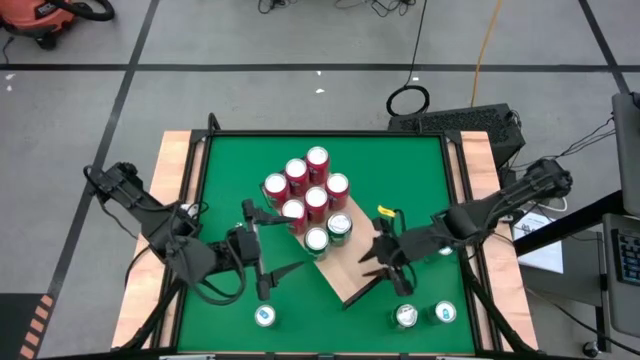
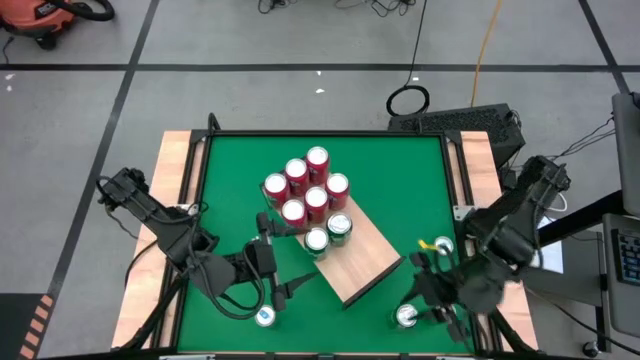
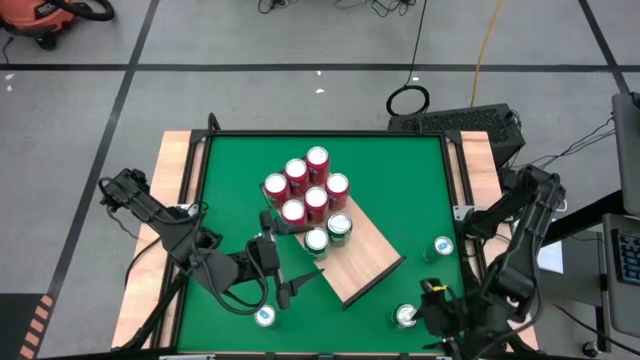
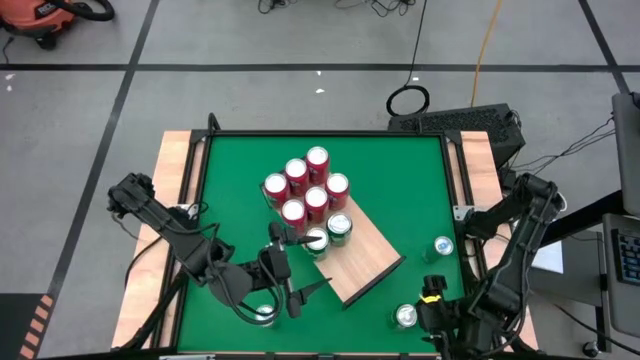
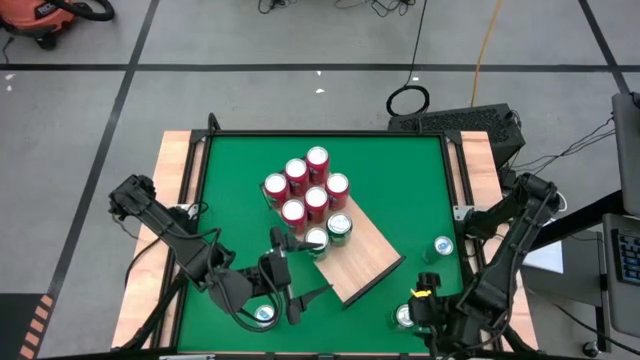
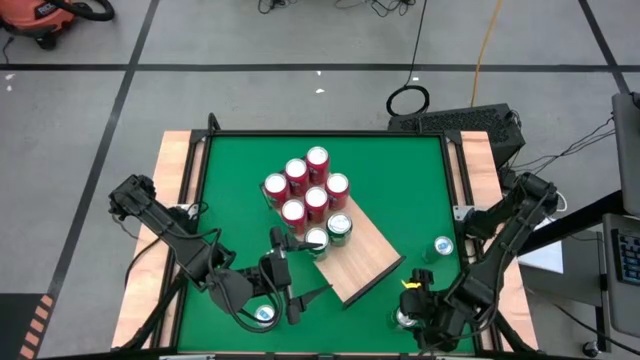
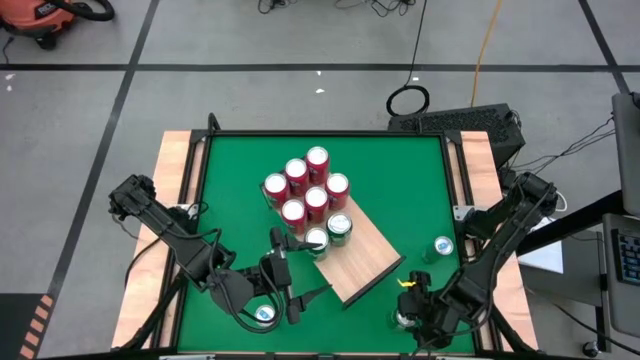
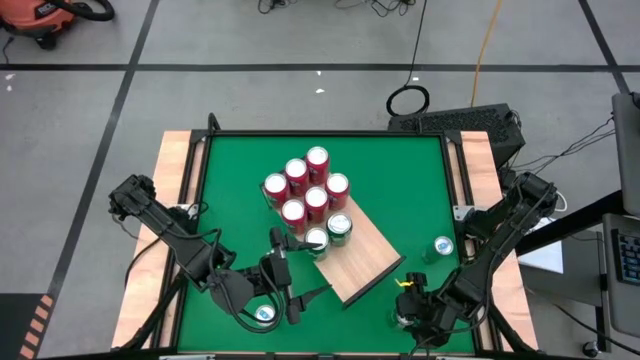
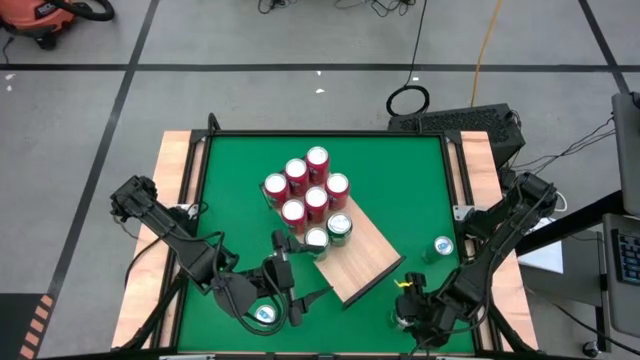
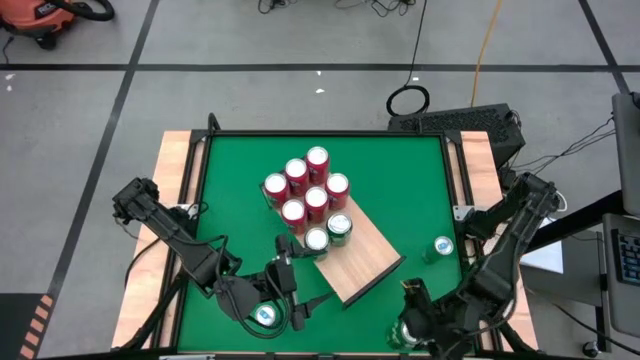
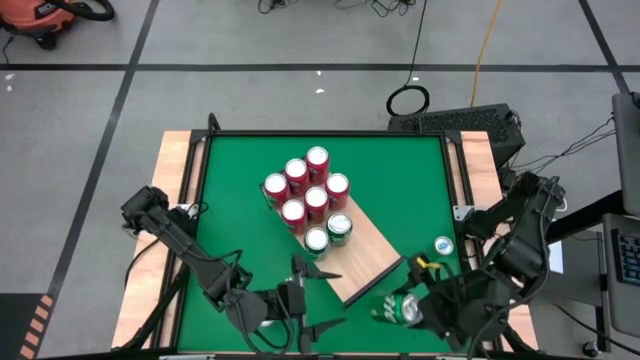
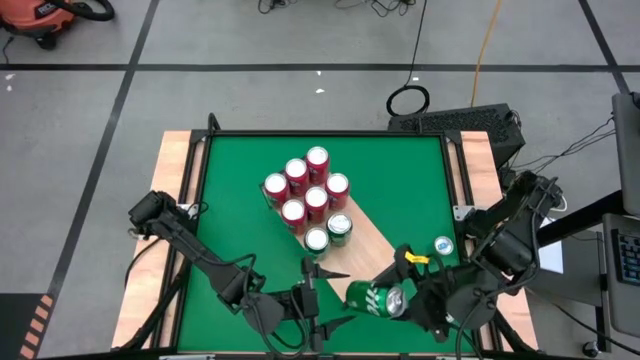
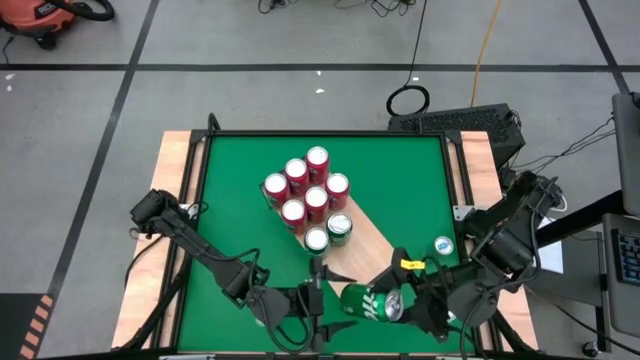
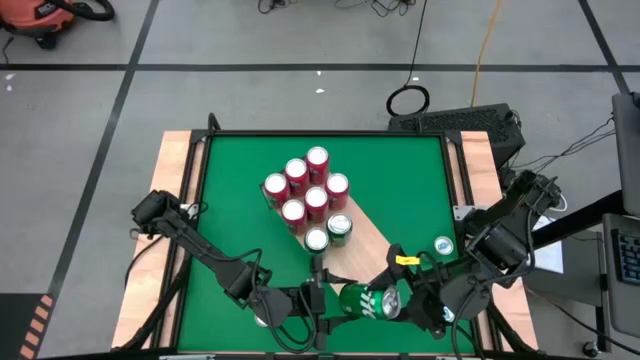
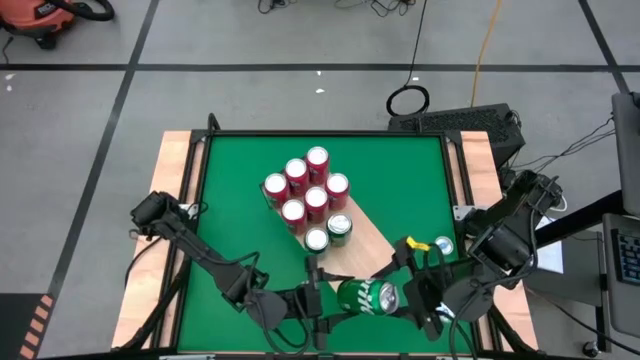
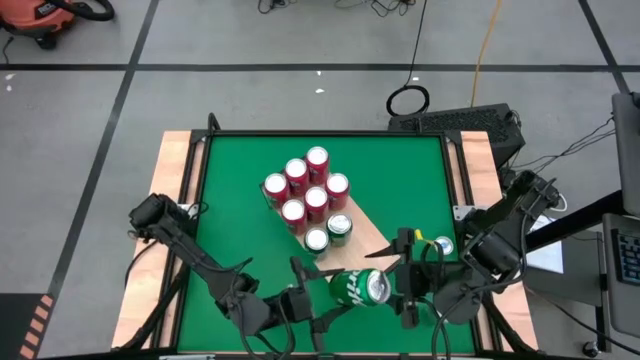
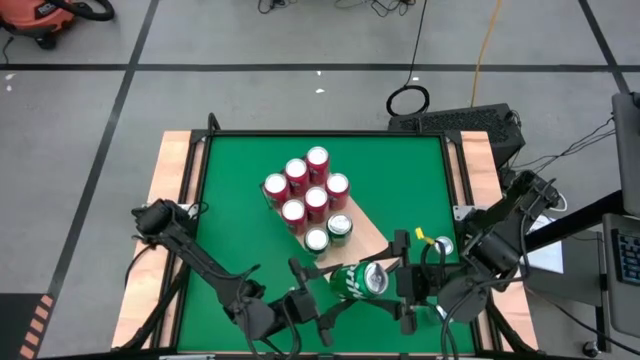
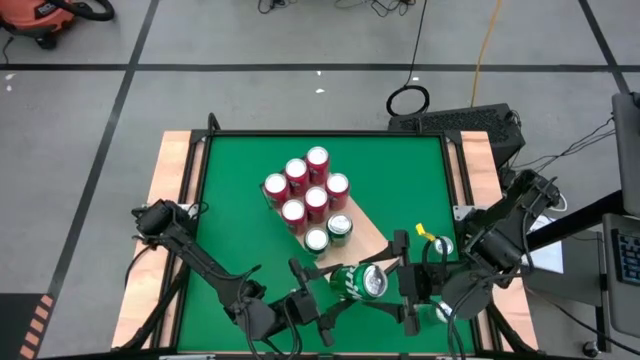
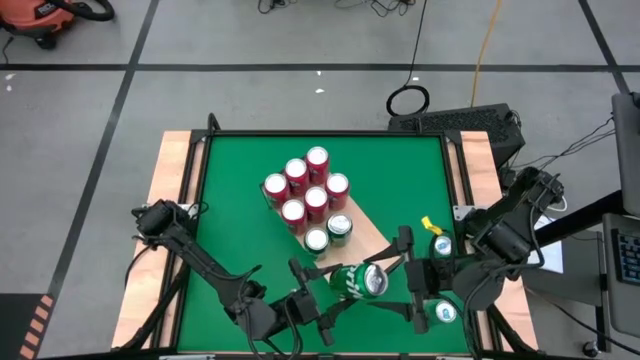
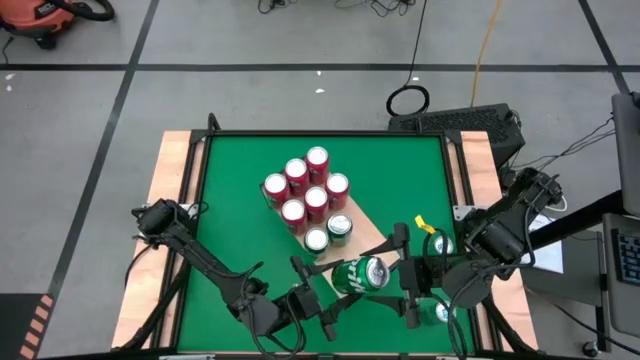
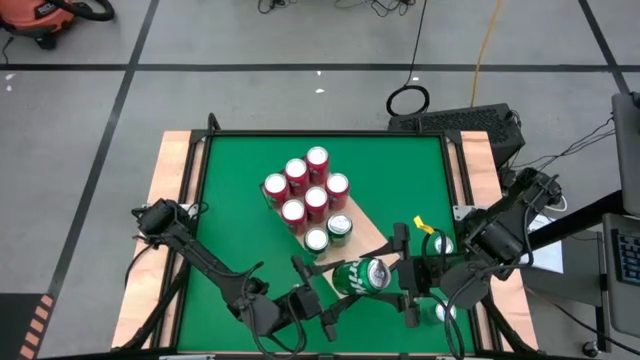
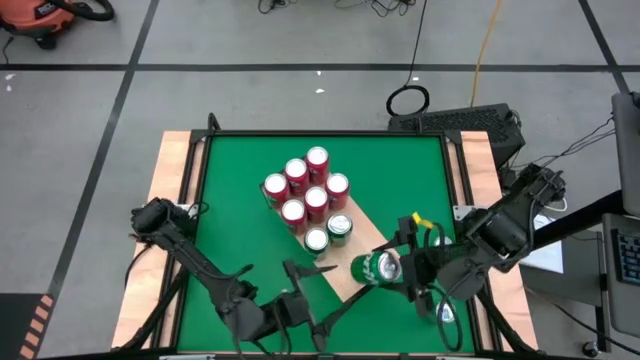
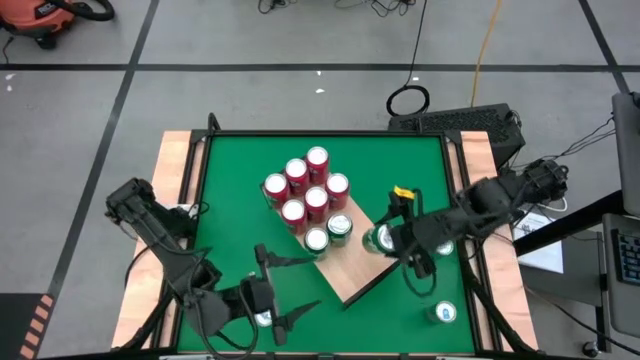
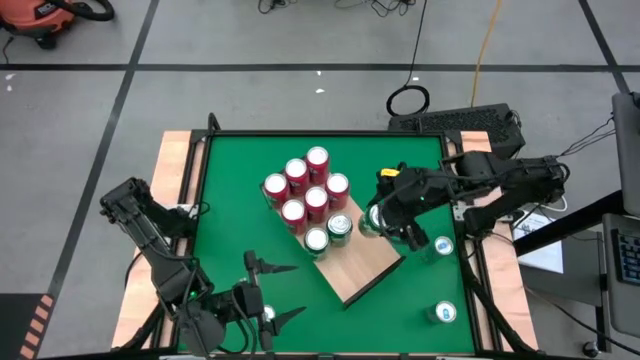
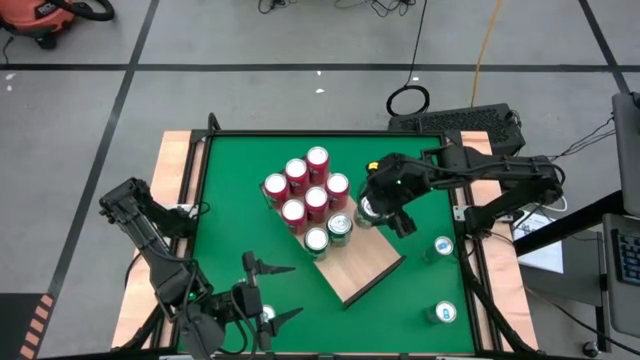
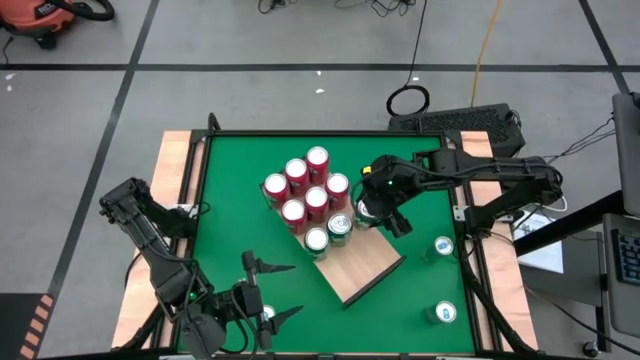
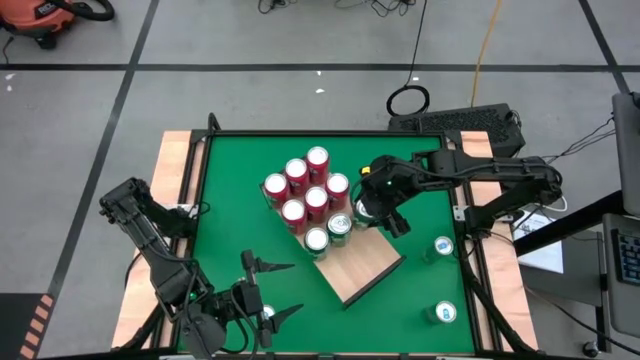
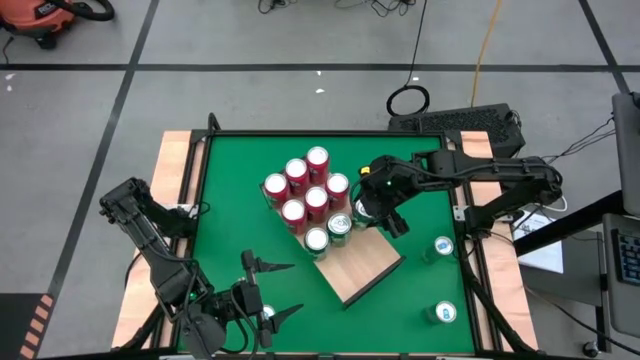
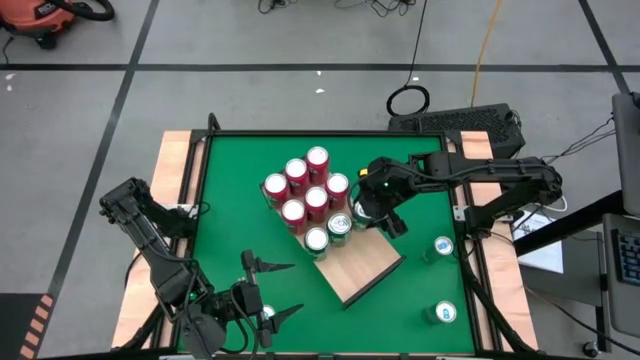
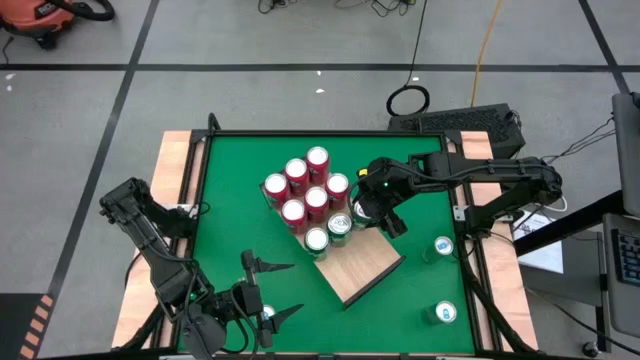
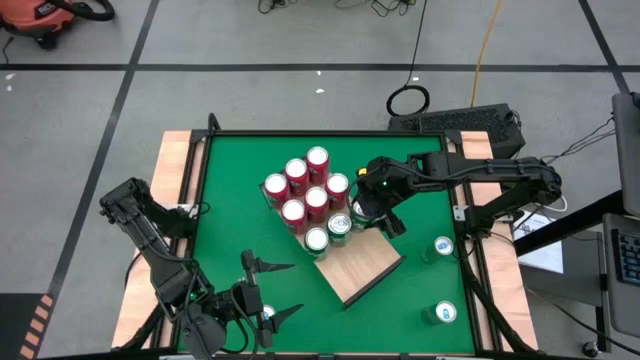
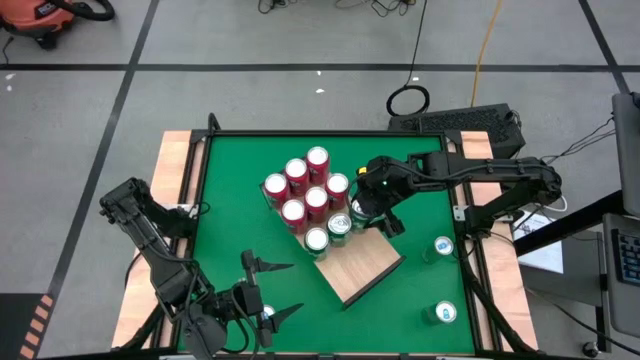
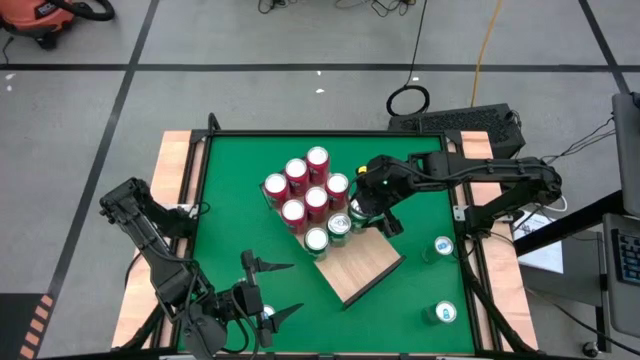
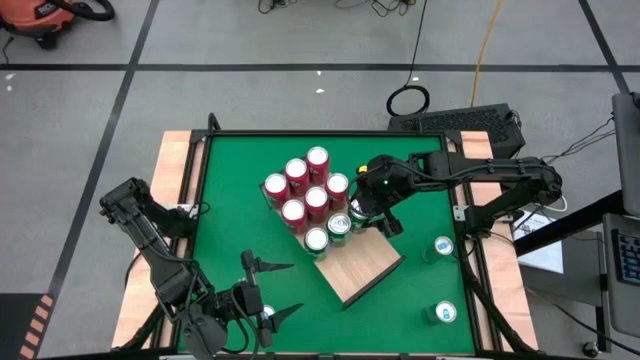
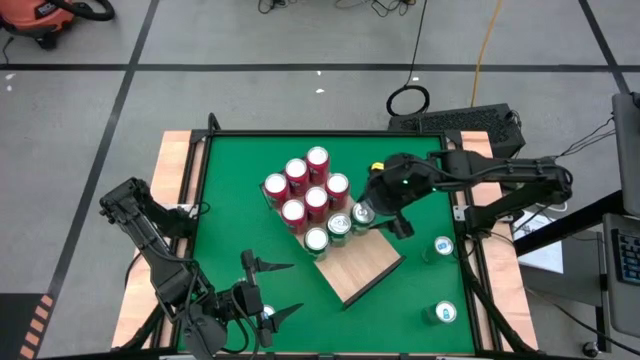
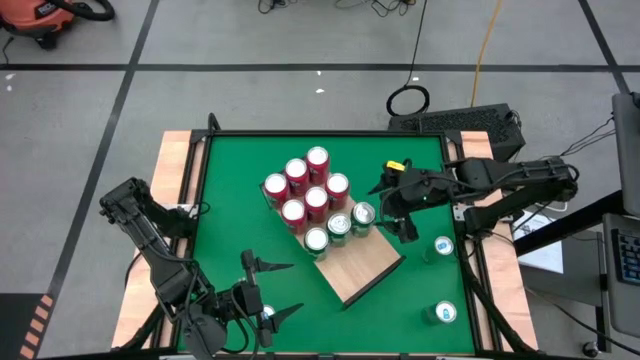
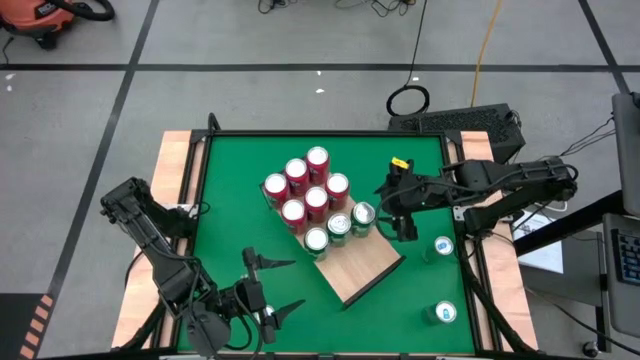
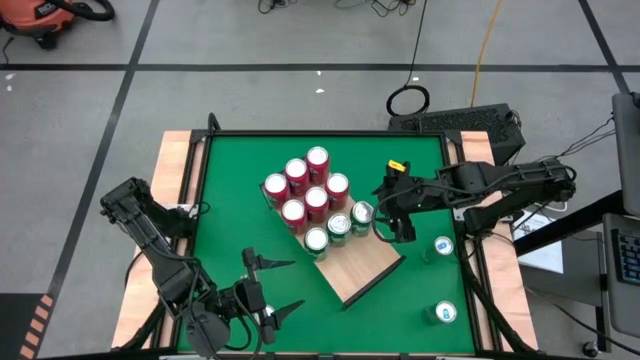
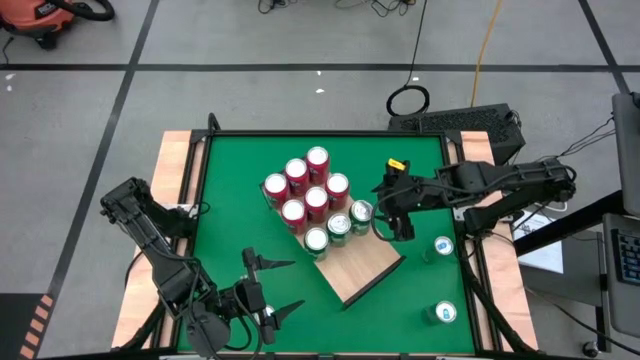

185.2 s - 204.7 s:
Task: Place canned beverage on shelf
Put the green soda can on the shelf aligned with the other green soda can

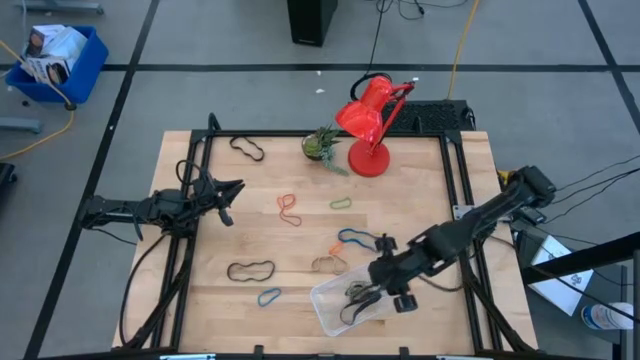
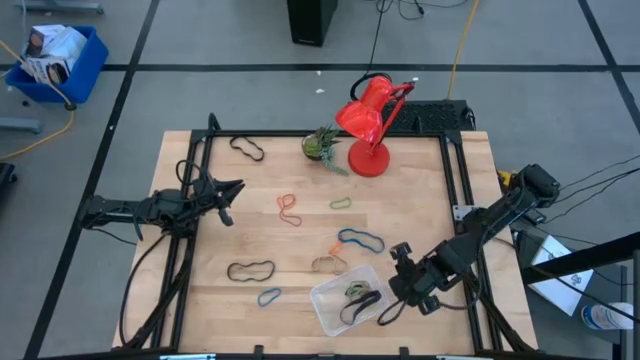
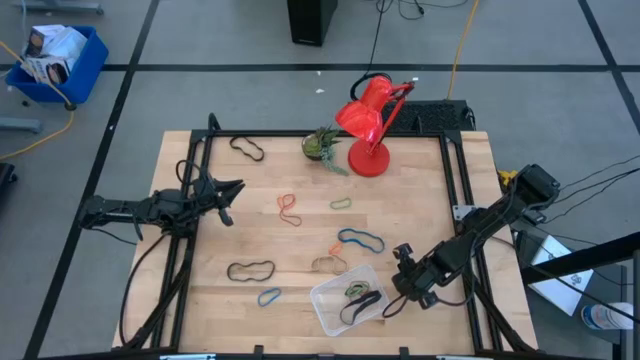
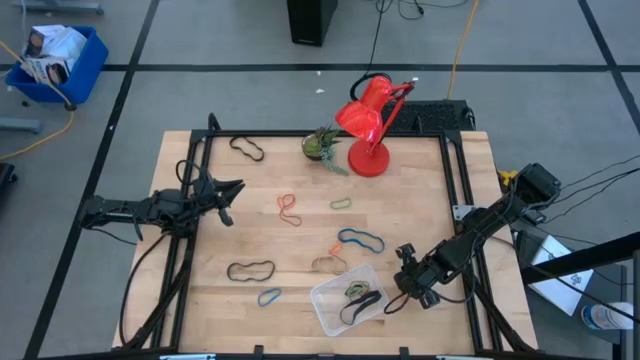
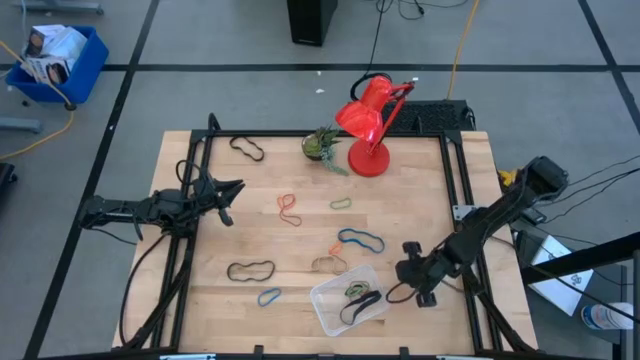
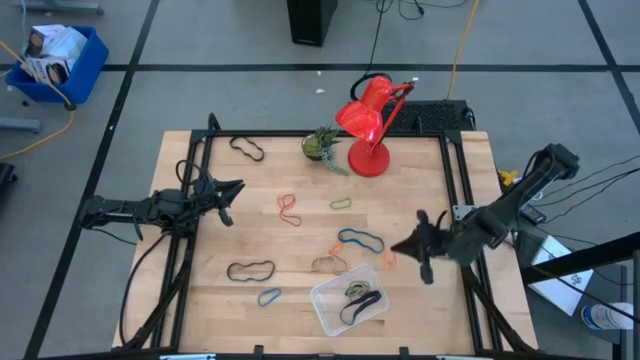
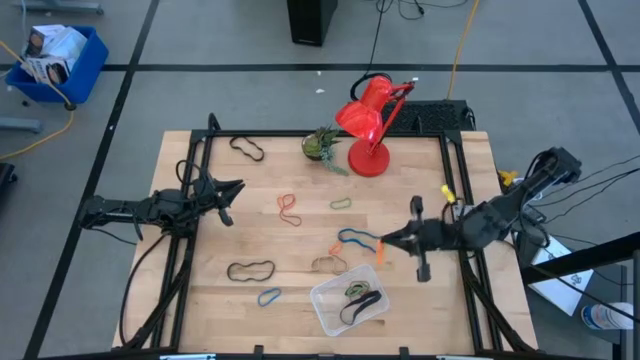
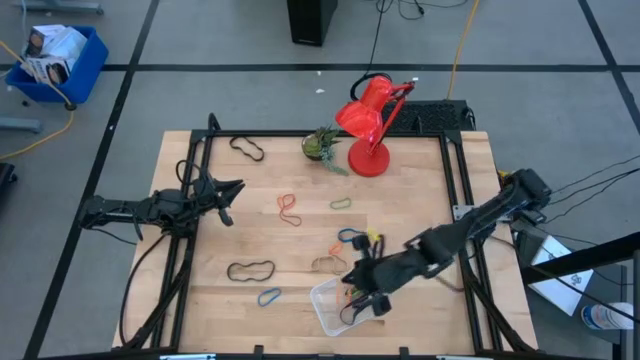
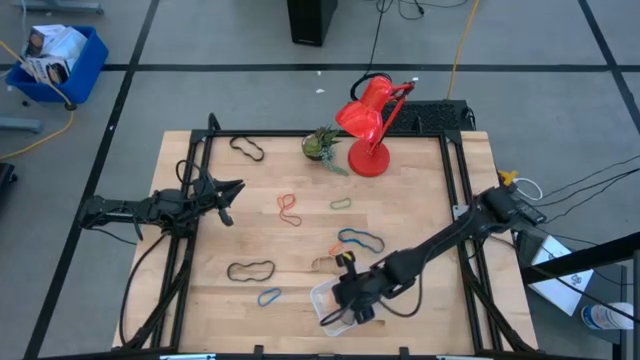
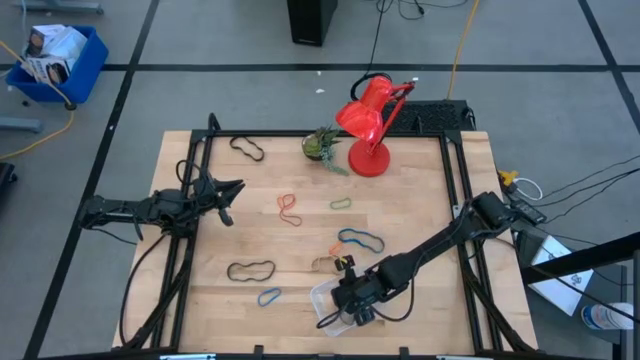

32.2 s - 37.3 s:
Task: Pick and place rubber bands into bin
Put the orange rubber band into the transparent container
